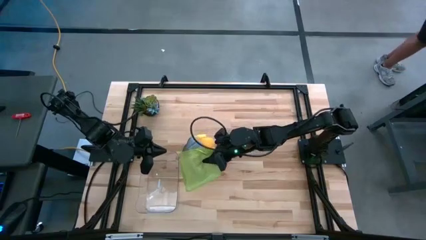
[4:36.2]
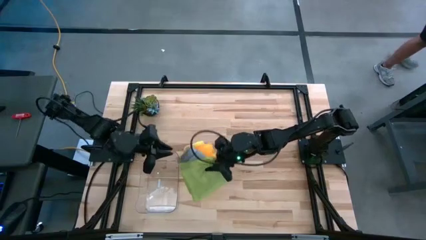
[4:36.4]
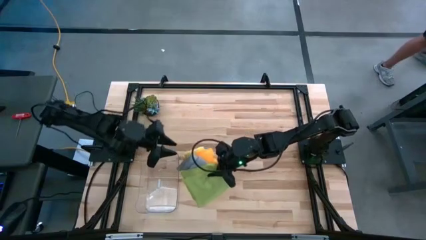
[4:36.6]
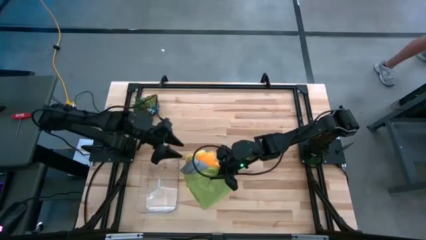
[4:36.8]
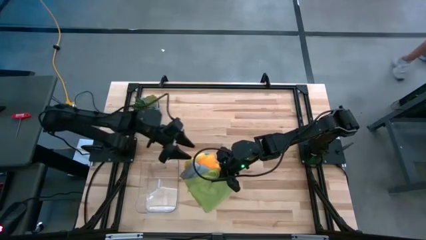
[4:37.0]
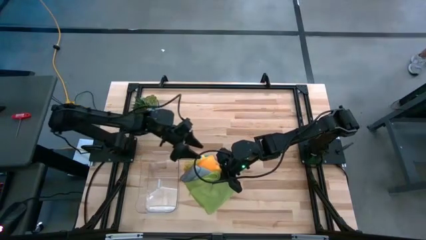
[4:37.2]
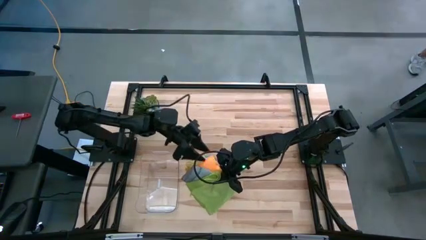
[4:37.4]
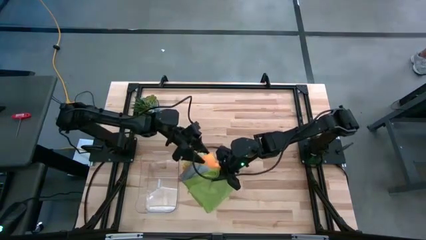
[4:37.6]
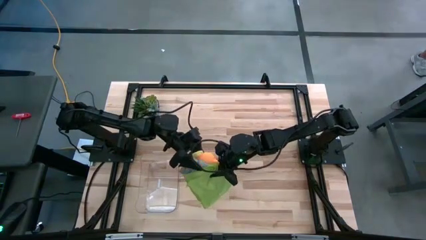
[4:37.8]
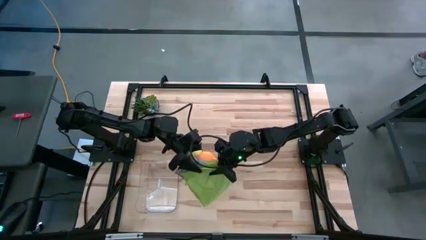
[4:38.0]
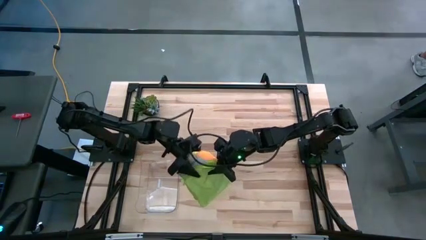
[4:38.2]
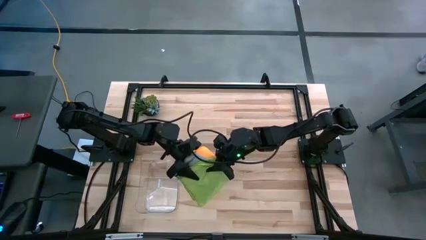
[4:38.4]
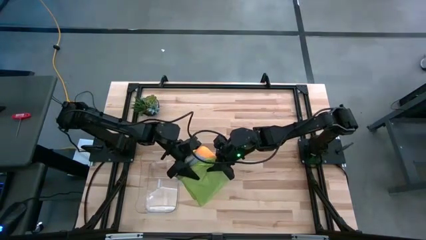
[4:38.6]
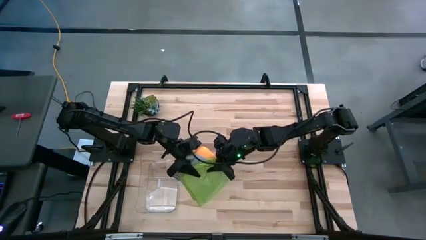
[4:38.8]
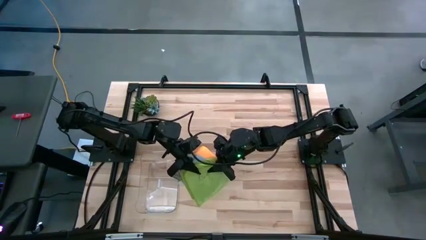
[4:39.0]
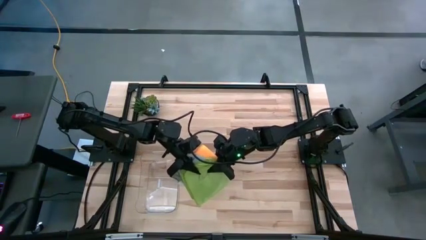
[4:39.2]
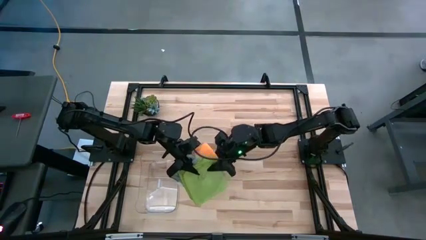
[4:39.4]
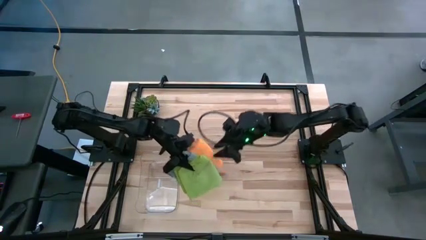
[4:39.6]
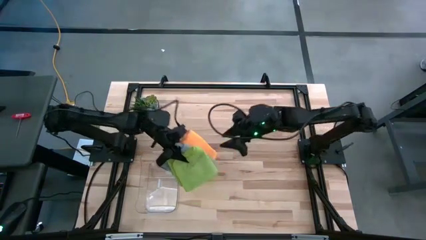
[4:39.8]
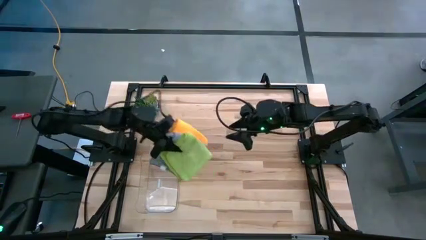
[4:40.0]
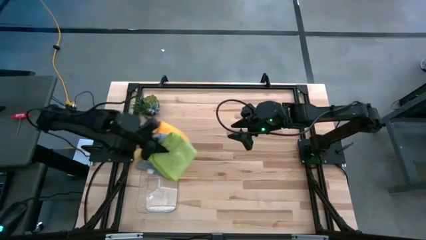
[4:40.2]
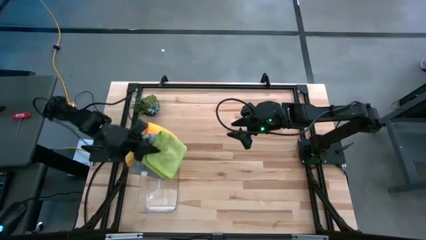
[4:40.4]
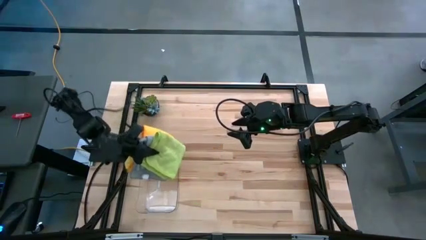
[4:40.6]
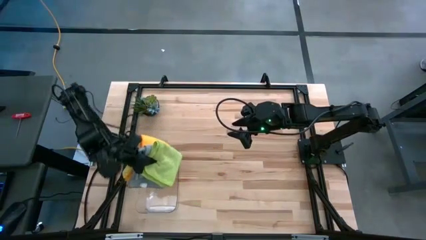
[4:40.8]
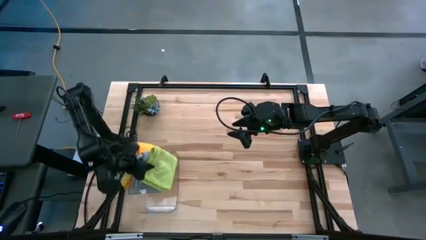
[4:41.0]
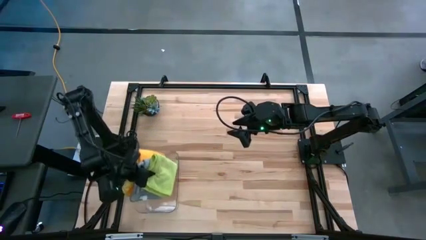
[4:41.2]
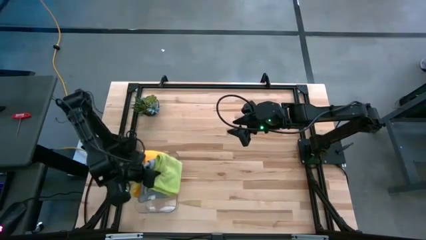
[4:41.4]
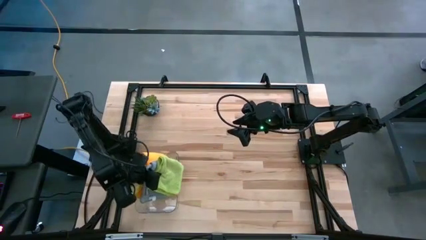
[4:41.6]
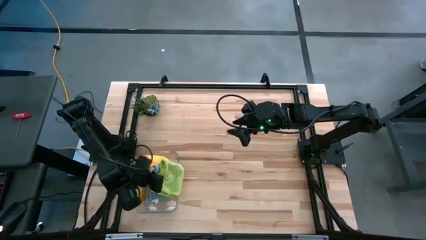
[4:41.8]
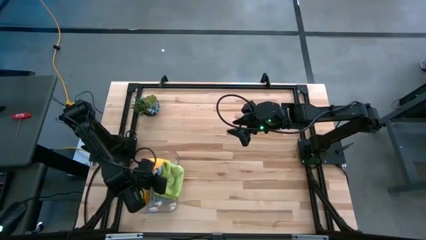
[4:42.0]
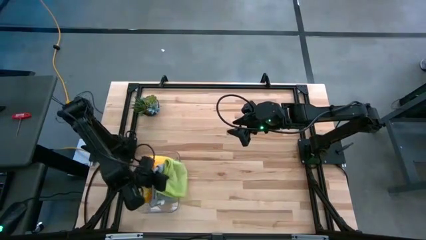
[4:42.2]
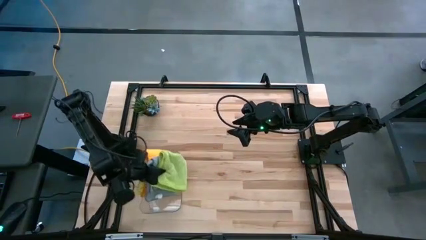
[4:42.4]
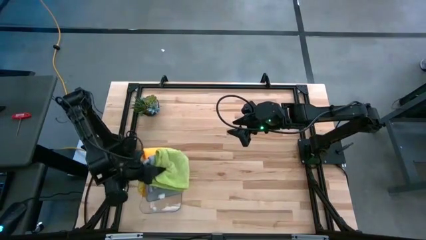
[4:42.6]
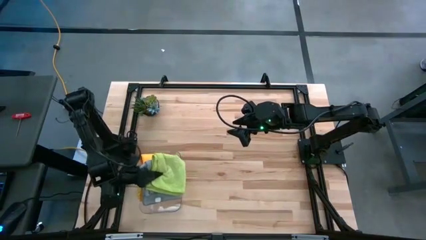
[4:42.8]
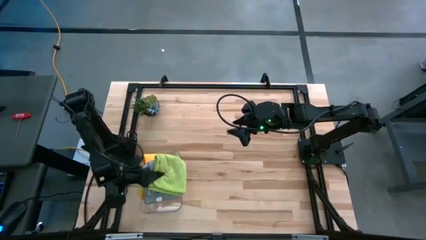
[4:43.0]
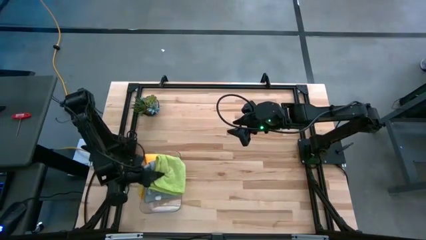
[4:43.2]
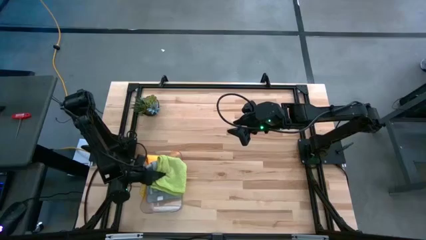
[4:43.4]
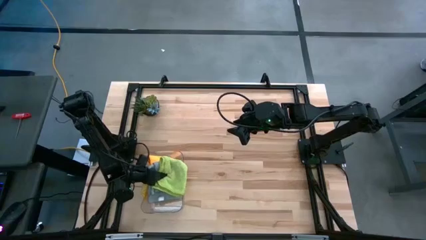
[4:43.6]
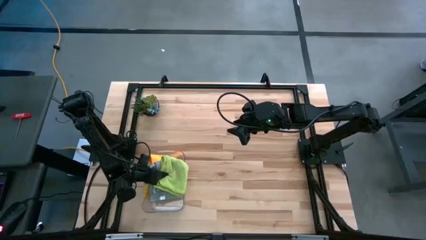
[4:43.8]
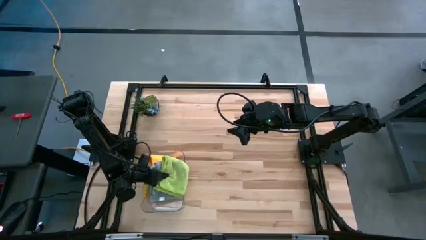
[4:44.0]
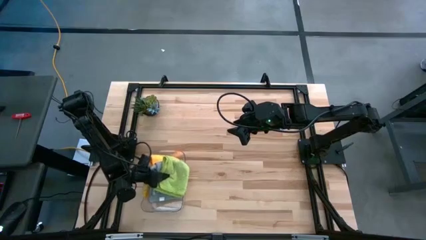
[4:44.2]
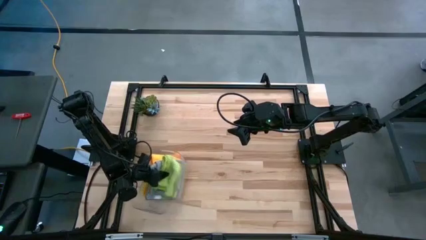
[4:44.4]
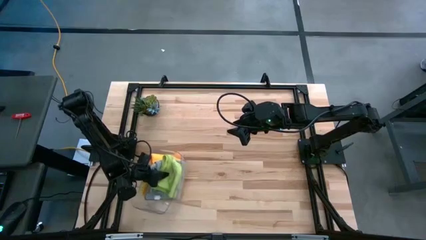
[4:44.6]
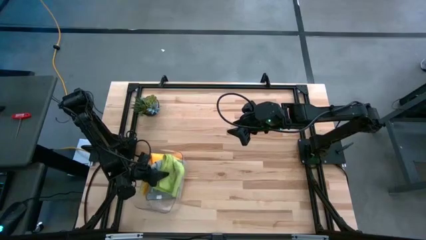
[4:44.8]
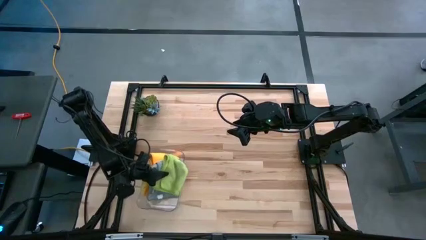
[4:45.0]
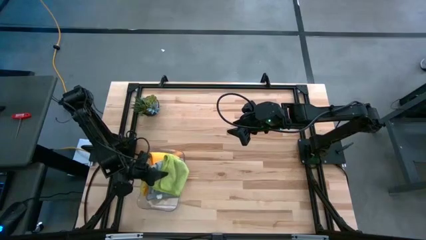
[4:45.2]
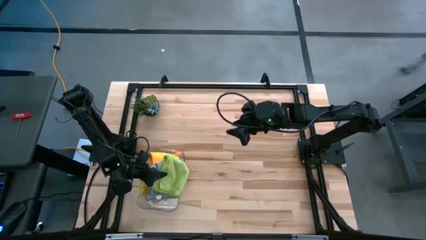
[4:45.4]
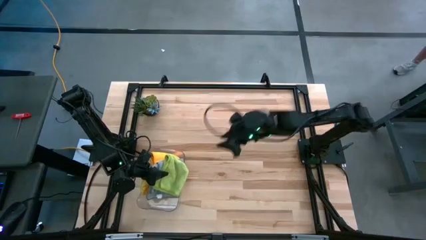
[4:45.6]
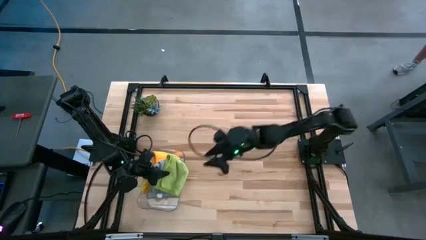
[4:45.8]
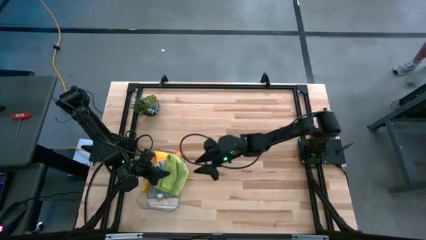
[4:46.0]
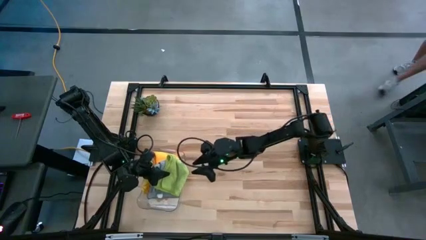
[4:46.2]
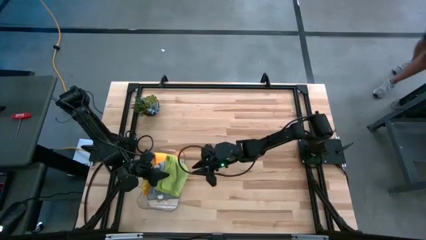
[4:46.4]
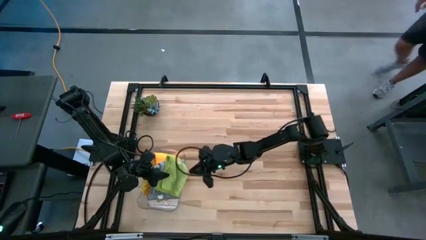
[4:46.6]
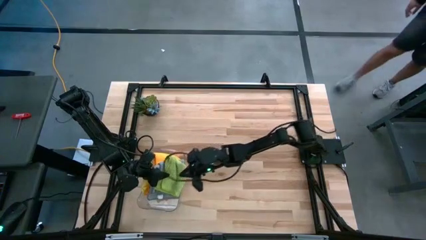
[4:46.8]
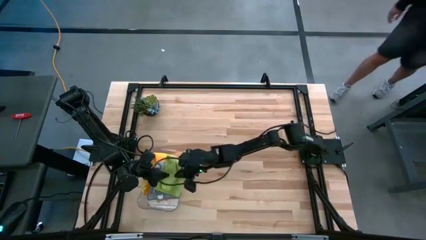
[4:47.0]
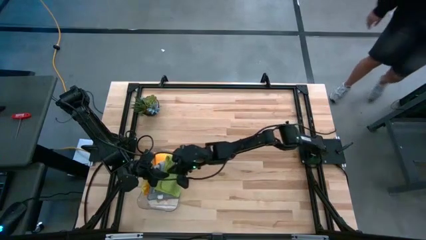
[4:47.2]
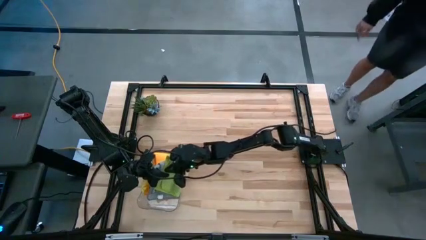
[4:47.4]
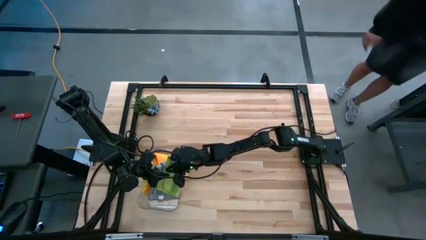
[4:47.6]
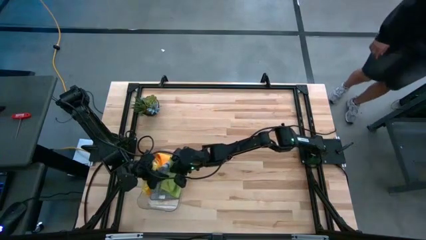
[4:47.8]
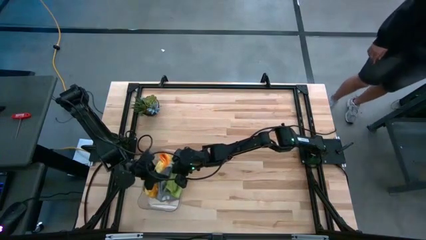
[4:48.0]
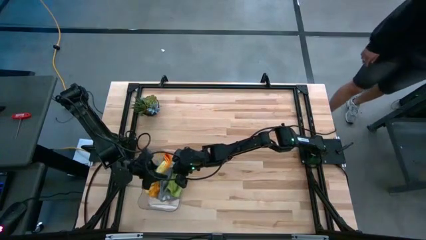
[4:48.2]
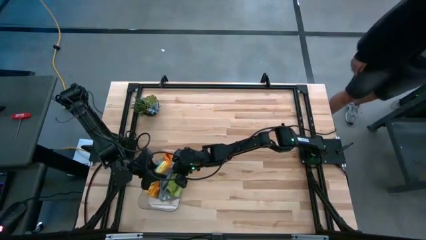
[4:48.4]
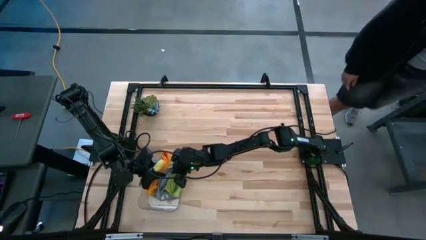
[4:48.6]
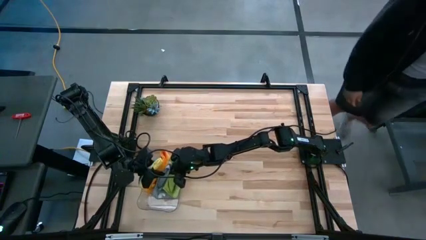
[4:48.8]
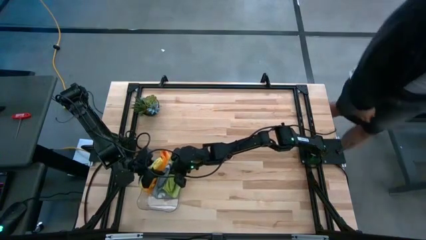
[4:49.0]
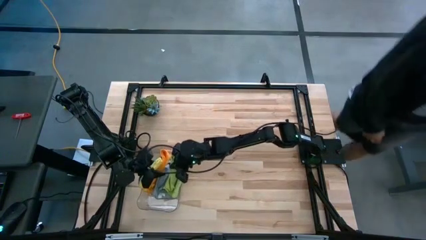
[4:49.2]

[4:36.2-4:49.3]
Task: Fold microfiber towels
Put the stacked towels into the transparent bin

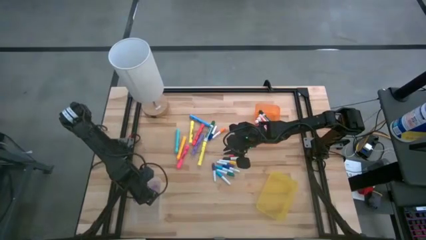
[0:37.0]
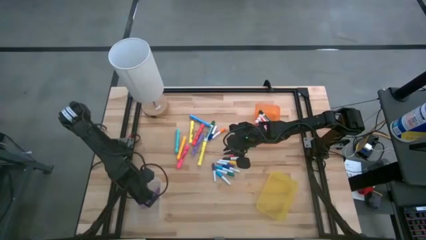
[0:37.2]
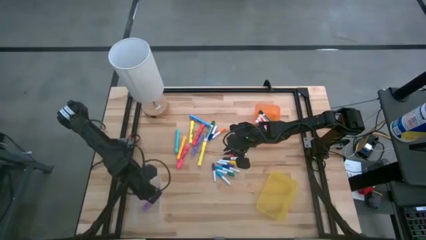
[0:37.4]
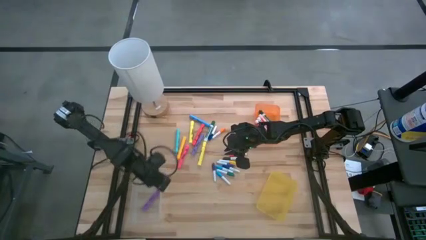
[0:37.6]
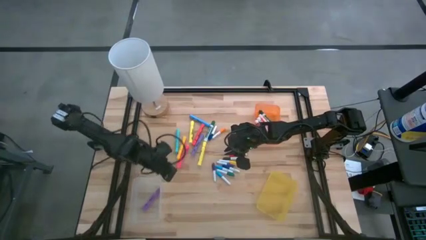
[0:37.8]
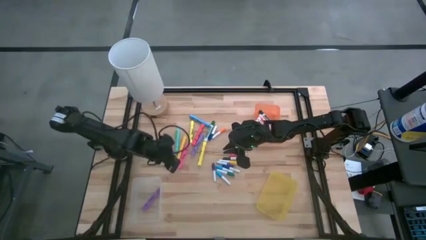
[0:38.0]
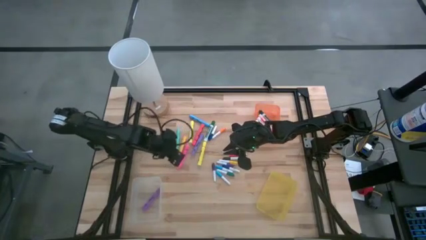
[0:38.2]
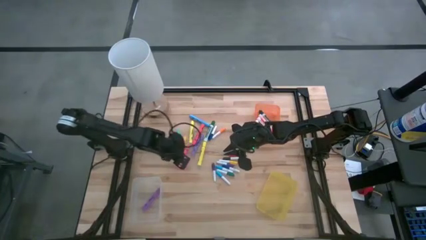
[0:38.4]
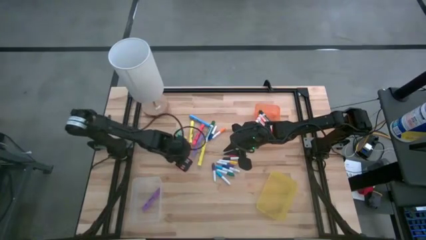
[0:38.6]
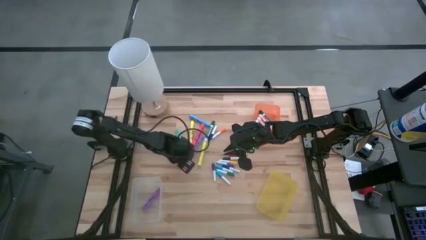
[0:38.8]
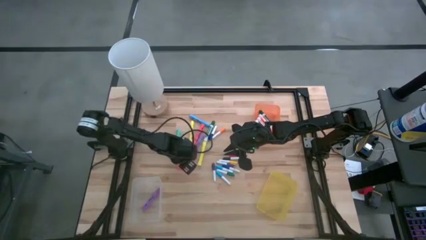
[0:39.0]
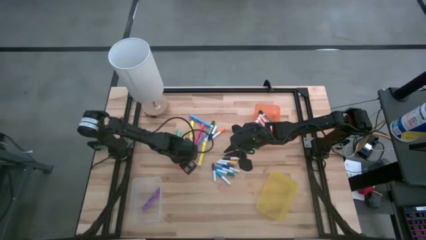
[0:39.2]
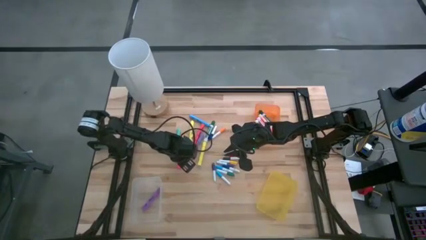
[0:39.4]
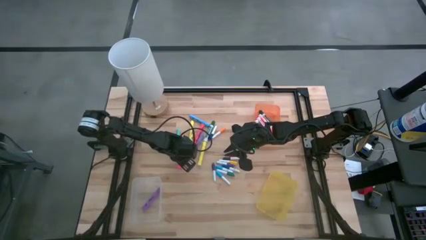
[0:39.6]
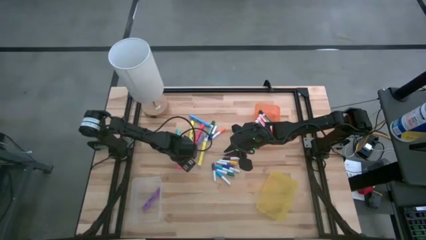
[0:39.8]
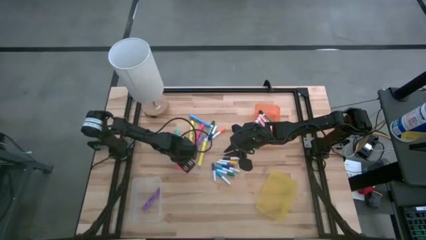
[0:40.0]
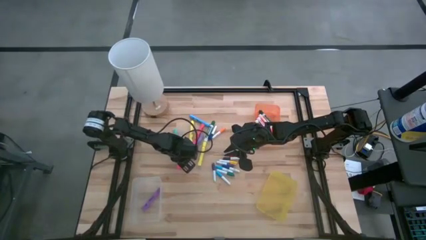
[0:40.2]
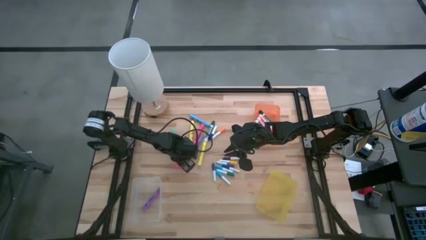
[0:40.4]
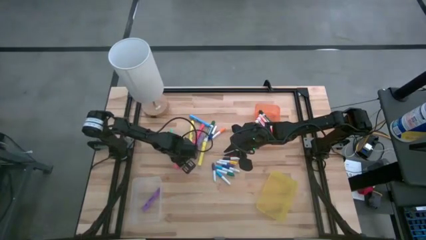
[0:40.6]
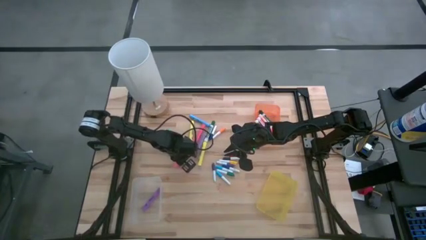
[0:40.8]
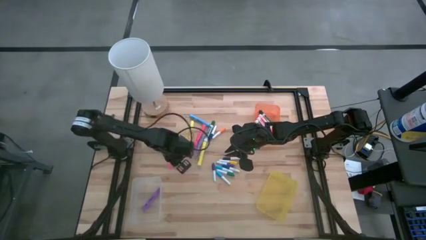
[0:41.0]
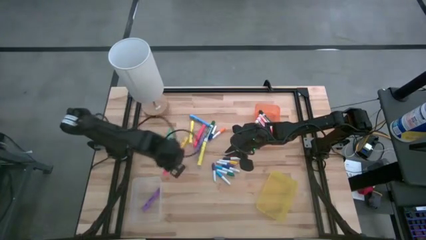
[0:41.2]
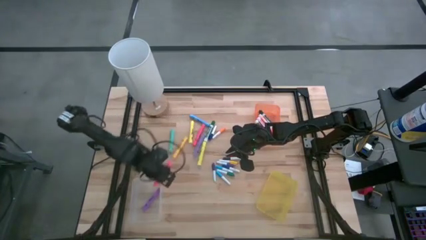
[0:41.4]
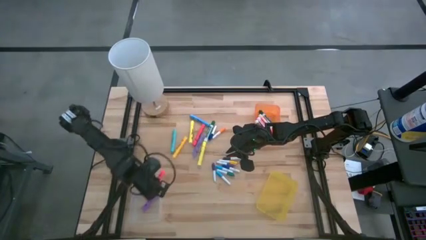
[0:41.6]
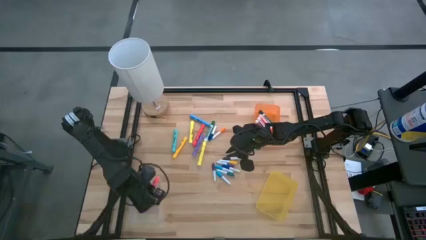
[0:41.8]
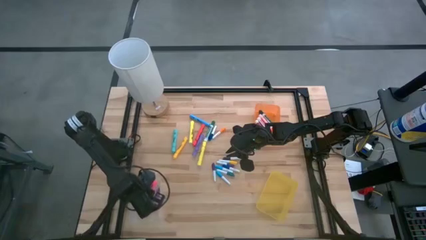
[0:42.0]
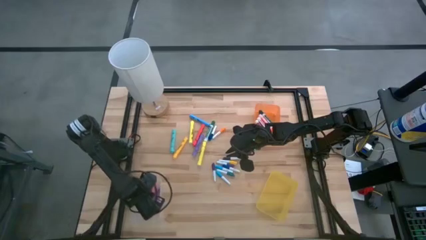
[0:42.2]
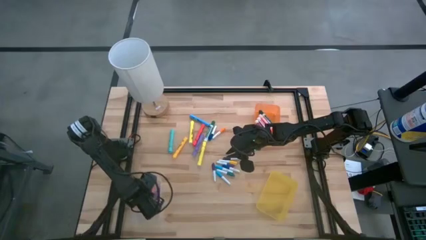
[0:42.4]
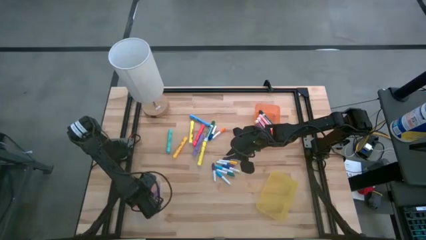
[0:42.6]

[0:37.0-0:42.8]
Task: Pick & Place Markers
Put the pink marker pen into the transparent bin
